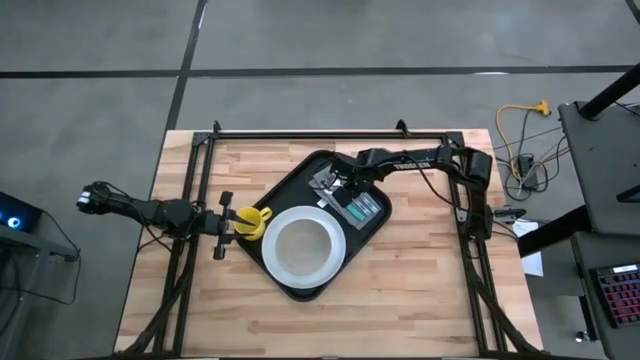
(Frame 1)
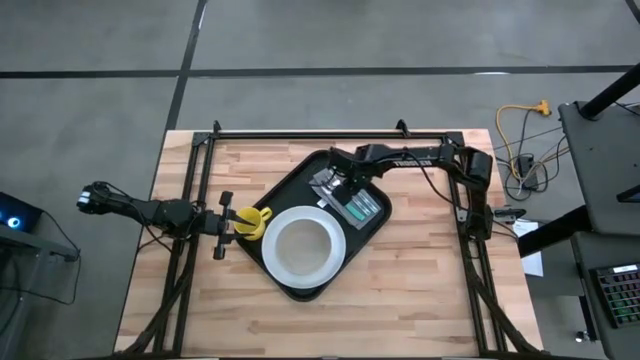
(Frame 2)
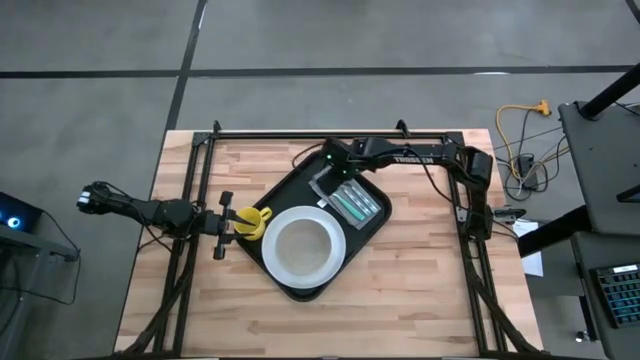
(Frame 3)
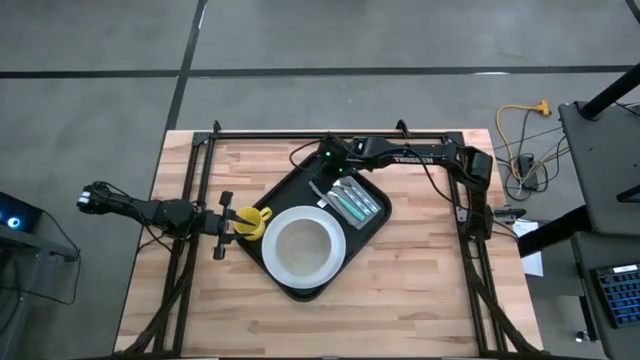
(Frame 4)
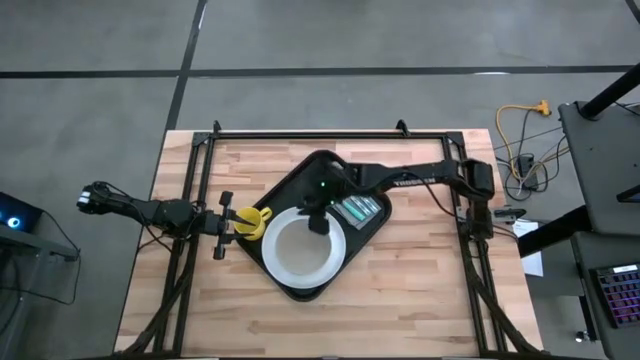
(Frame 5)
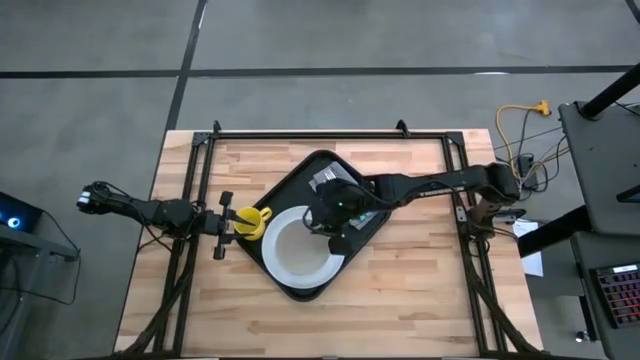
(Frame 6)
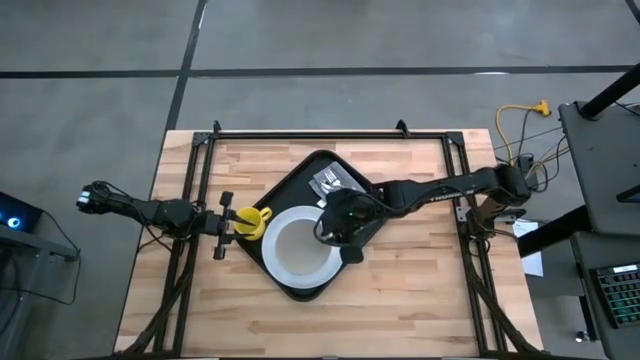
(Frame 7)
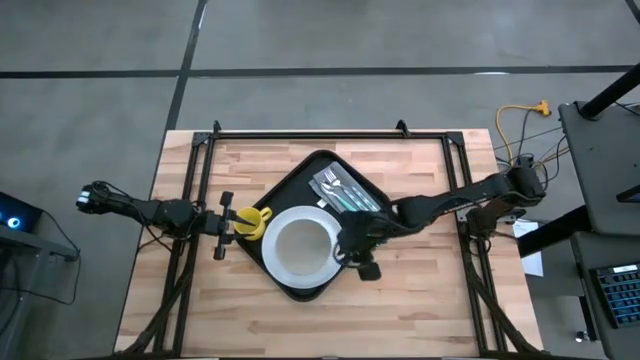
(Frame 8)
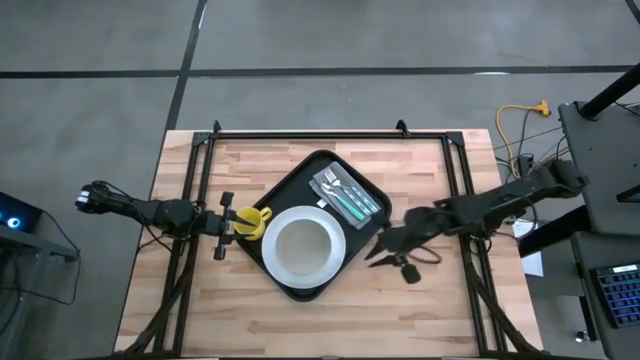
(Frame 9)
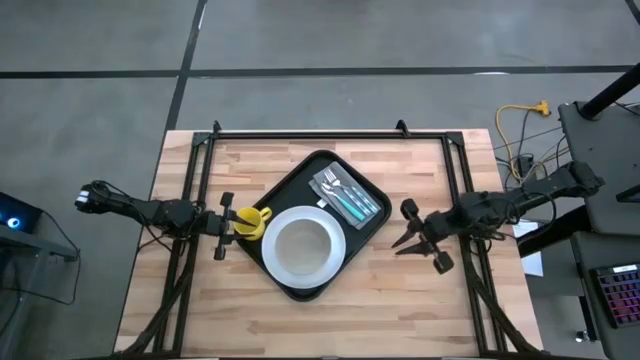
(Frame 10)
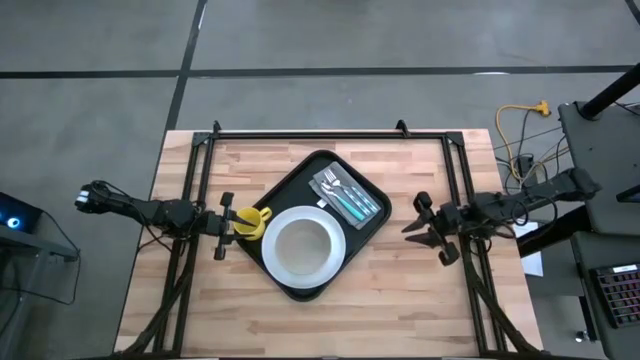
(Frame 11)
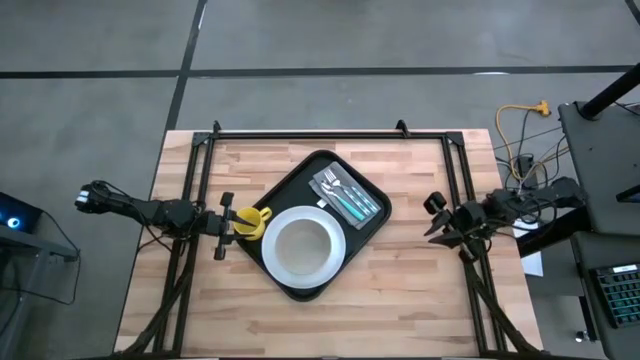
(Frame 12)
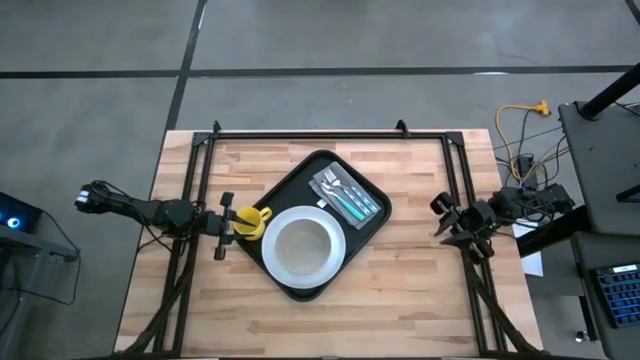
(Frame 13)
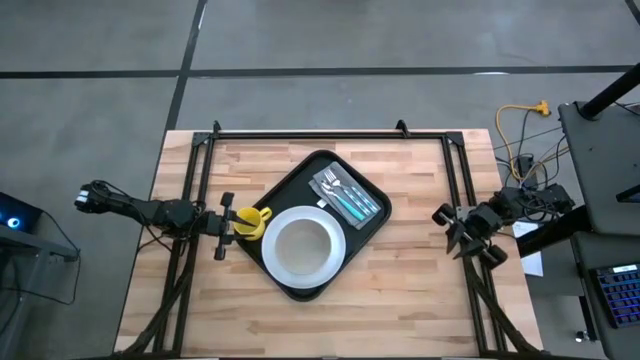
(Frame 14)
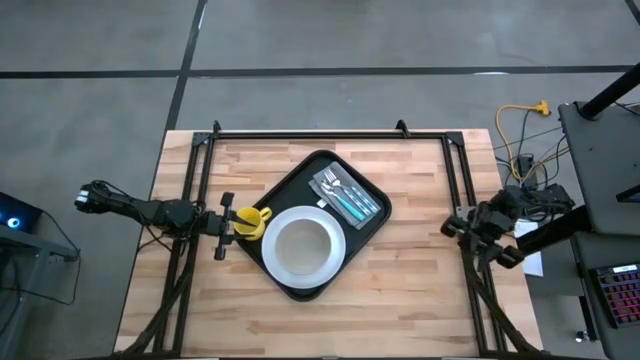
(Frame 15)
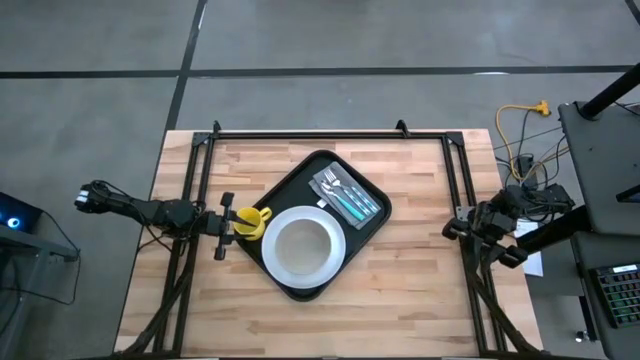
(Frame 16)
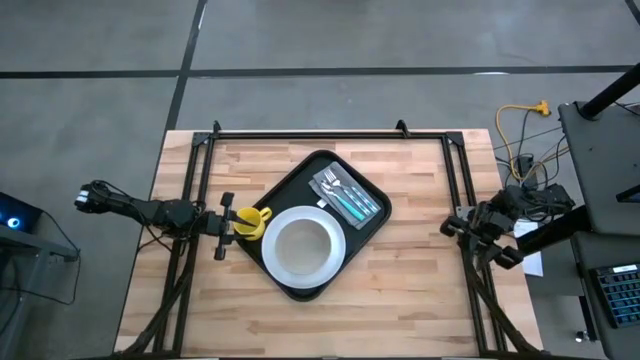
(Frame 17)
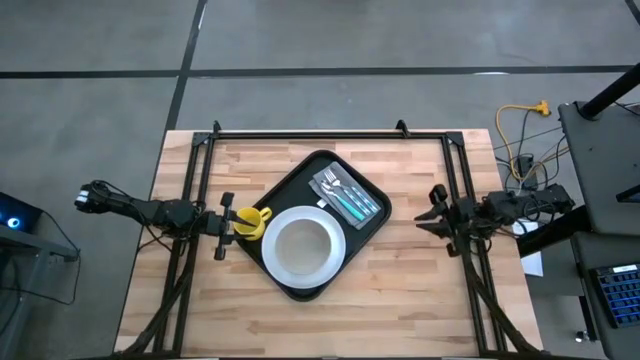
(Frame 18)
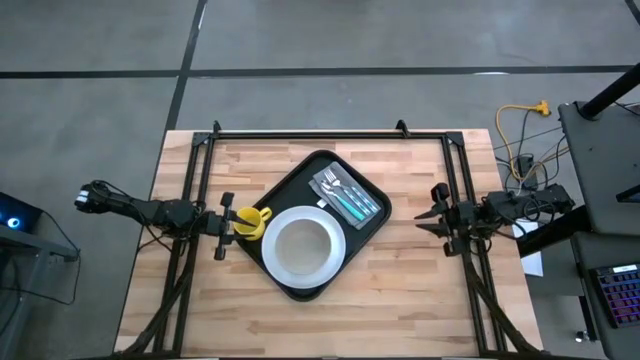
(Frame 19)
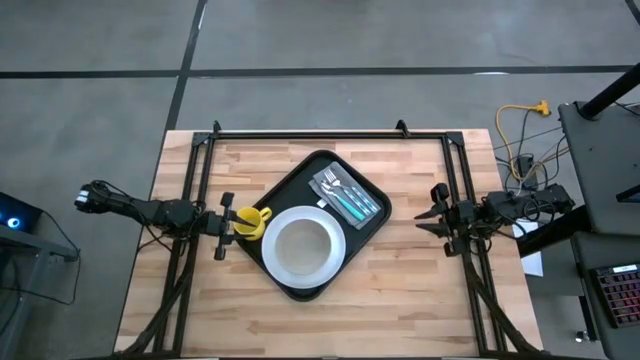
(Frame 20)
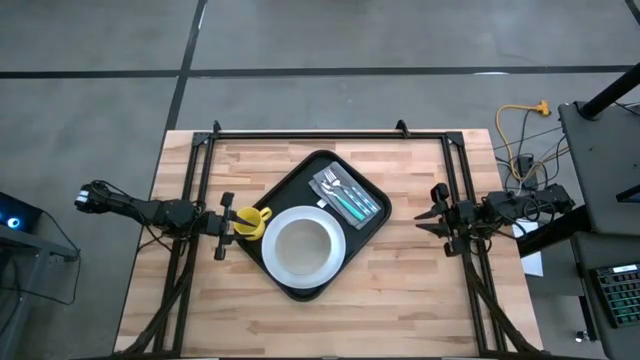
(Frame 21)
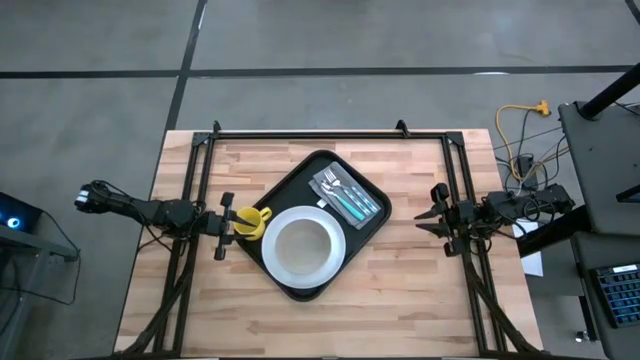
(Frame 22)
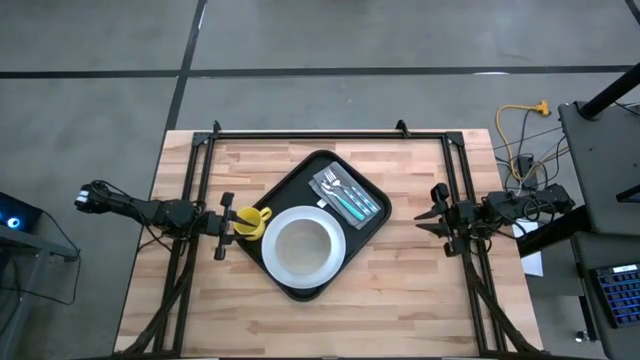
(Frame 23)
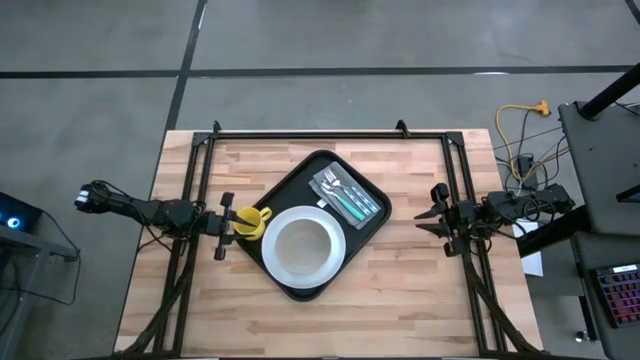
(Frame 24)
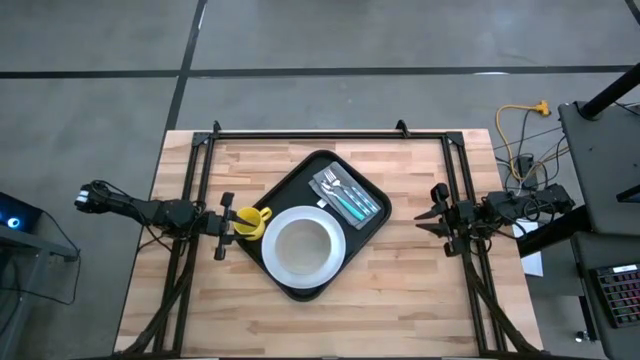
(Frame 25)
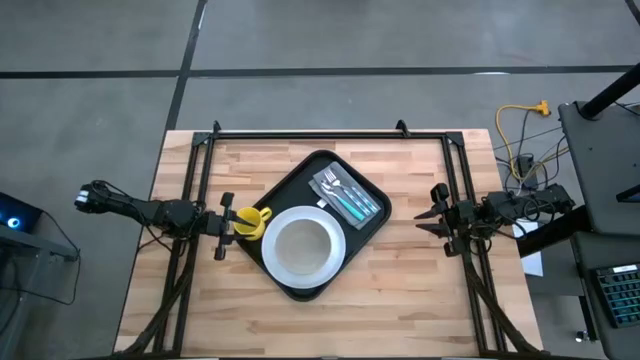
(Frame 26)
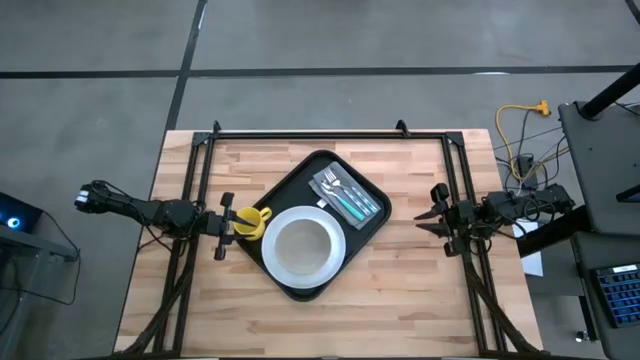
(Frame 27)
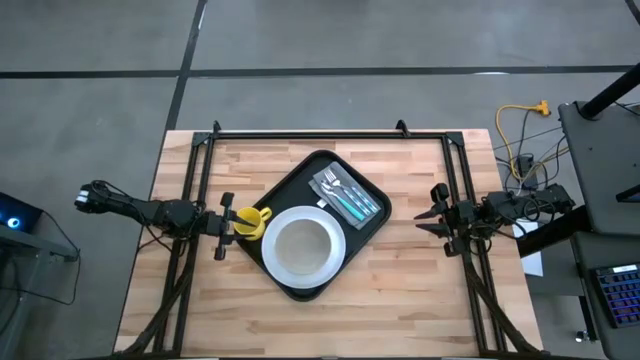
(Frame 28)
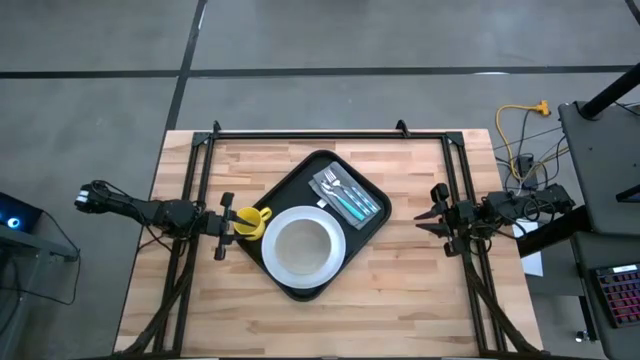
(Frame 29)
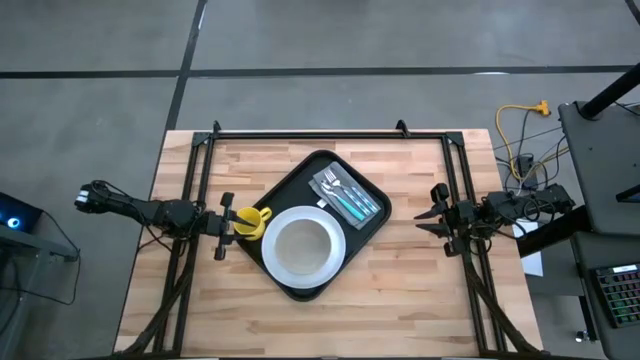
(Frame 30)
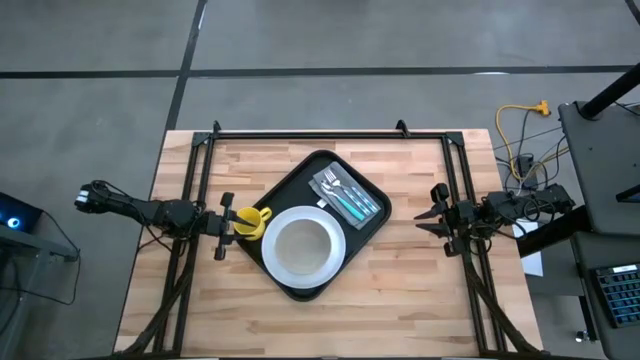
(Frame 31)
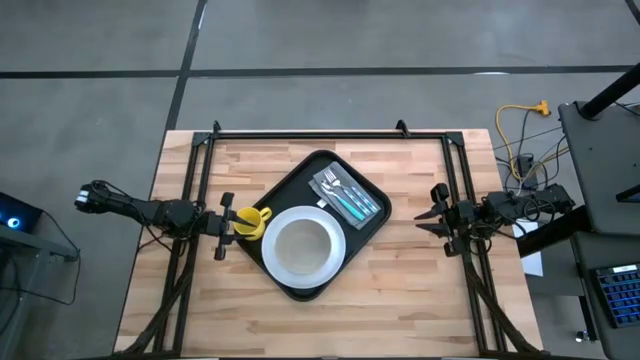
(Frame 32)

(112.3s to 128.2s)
Task: Set up tray
Return to Home Position

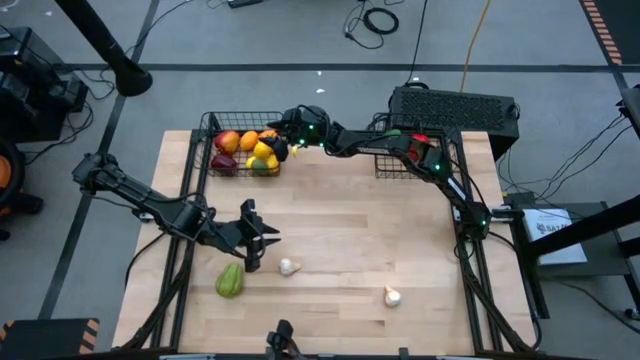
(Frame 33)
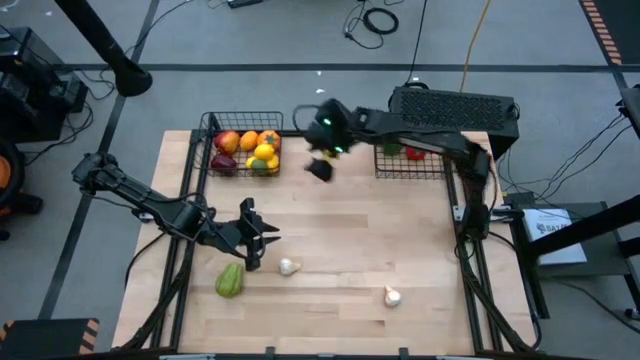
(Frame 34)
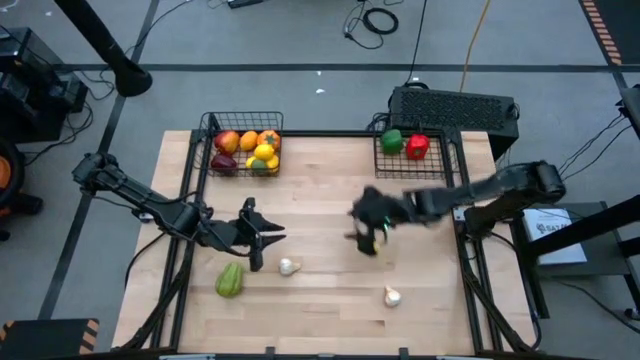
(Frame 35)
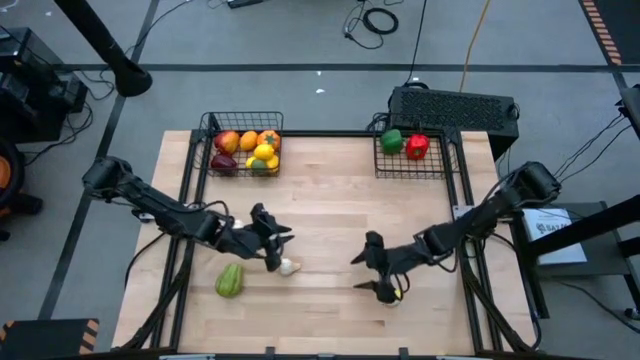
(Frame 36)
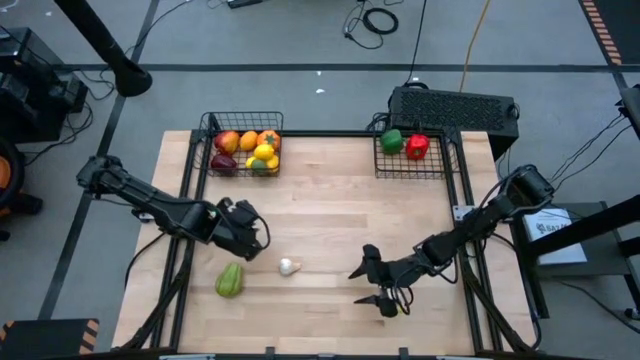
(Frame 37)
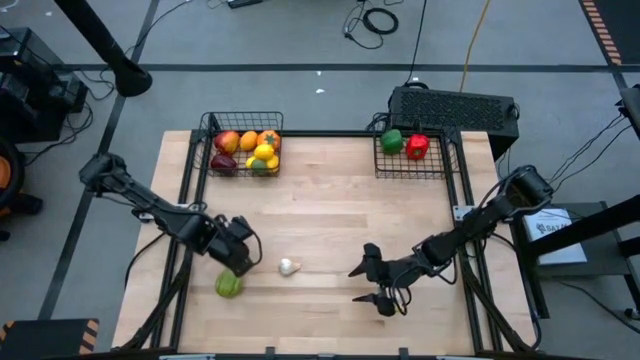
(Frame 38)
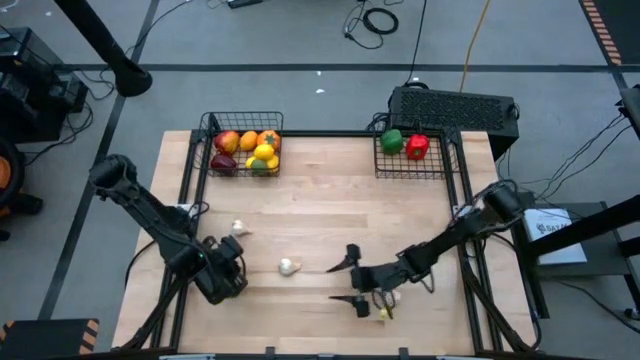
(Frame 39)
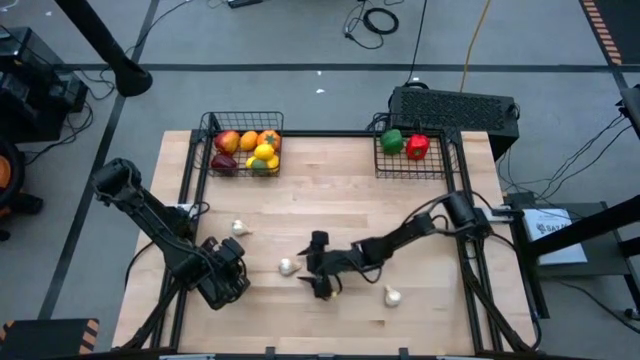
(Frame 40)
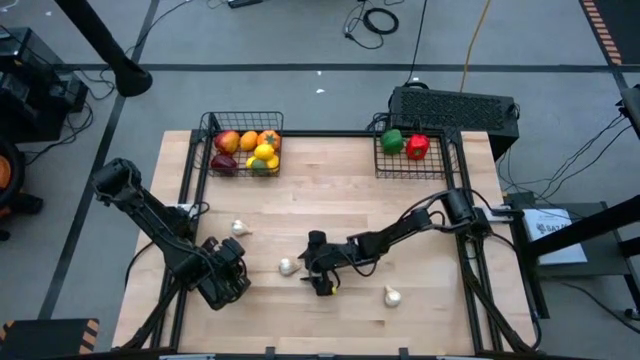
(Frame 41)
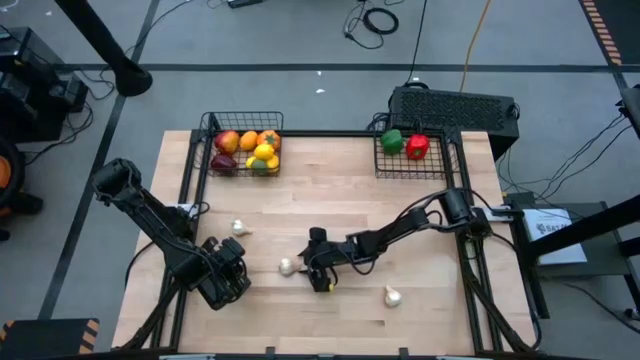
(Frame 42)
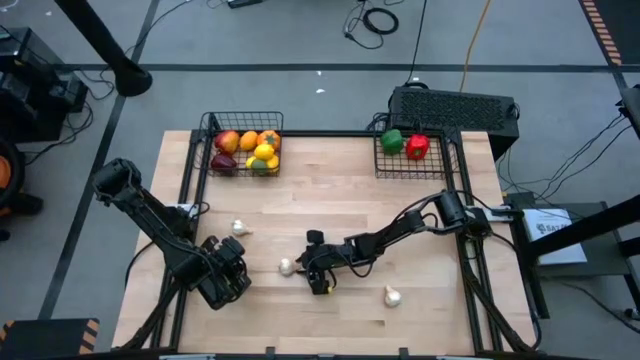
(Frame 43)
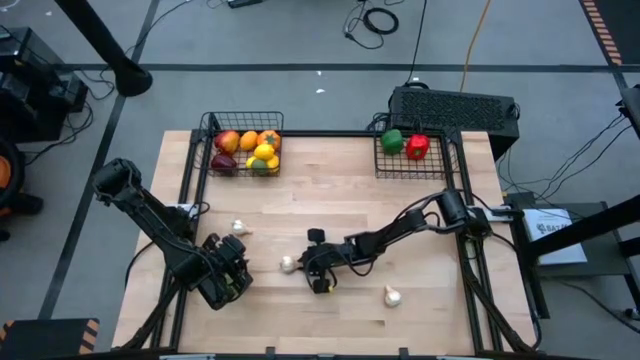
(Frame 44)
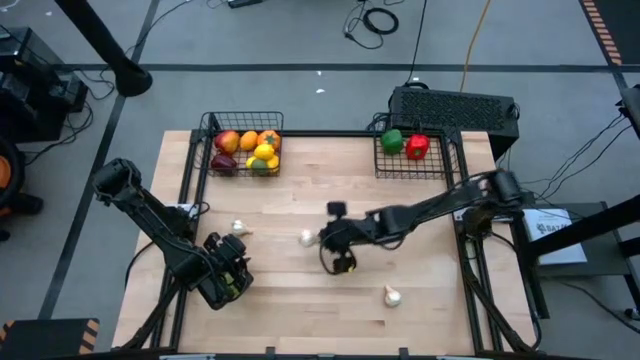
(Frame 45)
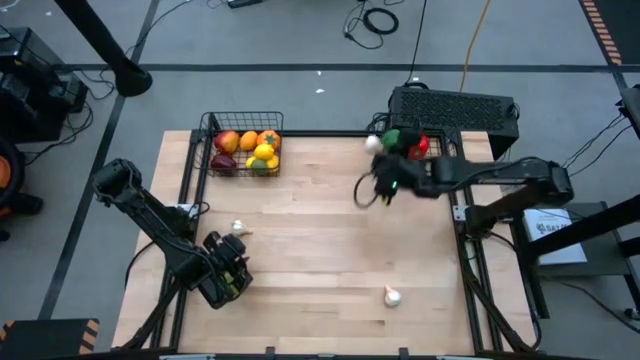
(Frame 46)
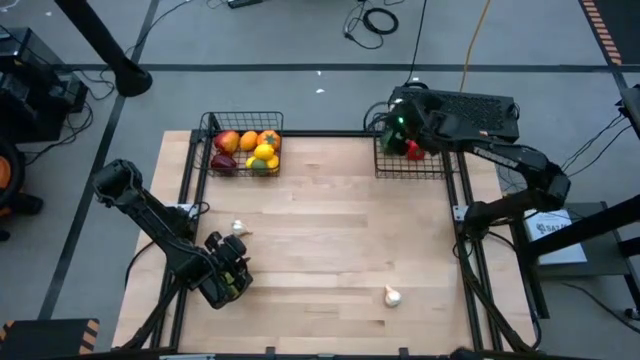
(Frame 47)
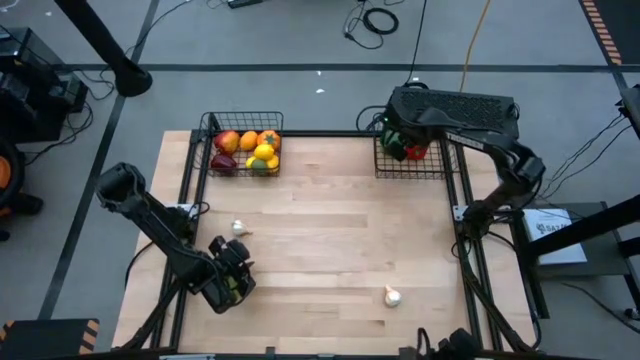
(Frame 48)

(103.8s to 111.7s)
Task: Sort produce into baskets
Put the middle white garlic in the right basket
